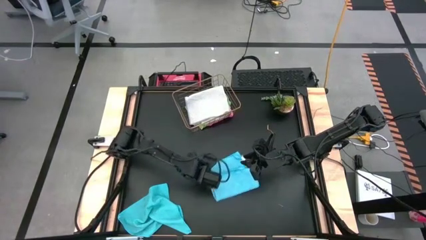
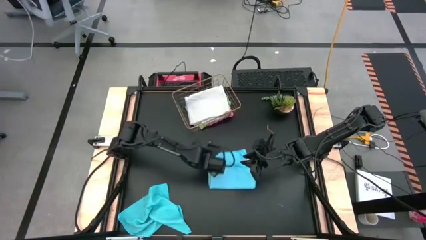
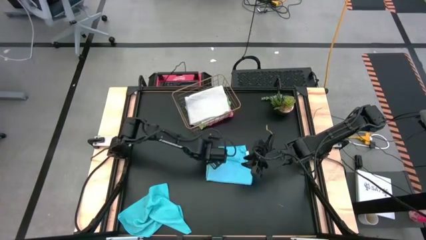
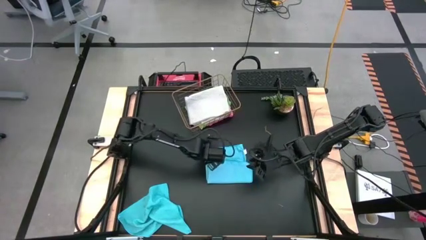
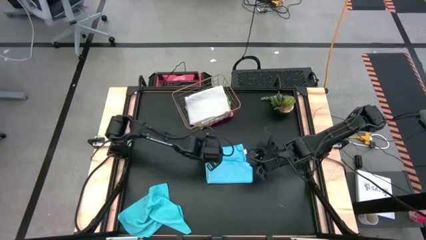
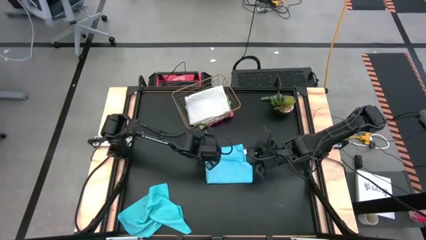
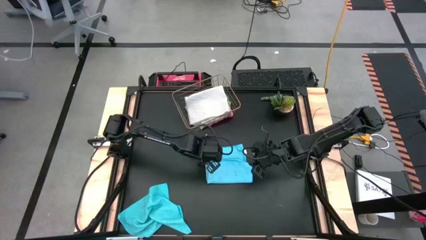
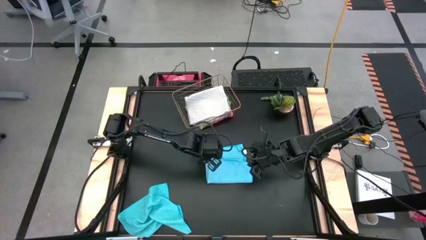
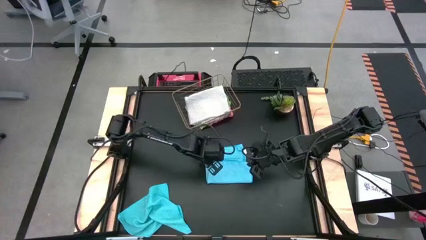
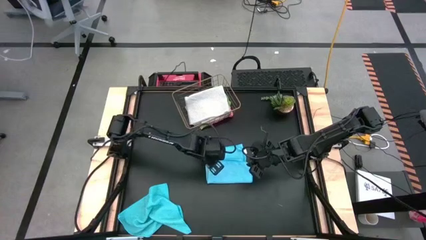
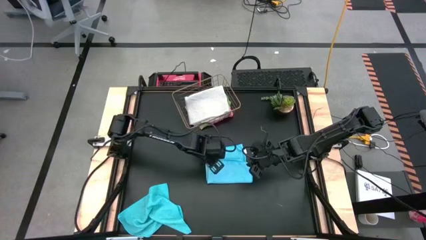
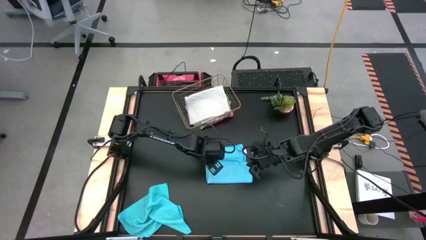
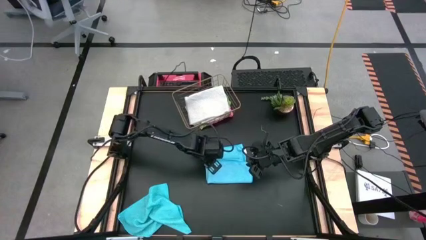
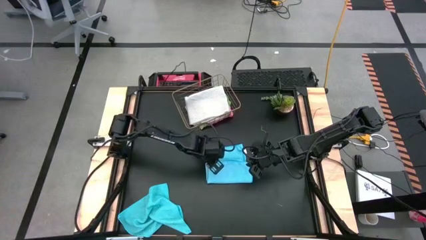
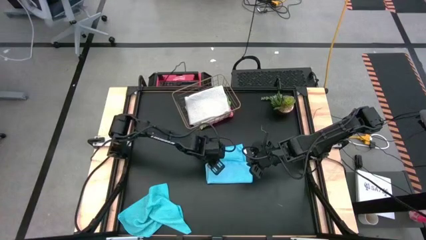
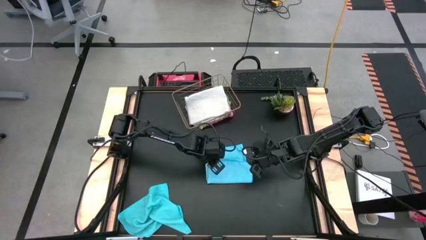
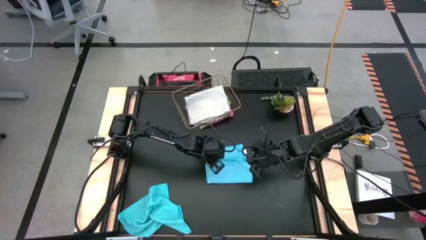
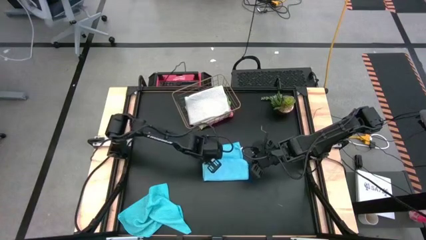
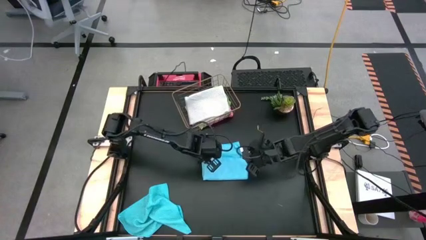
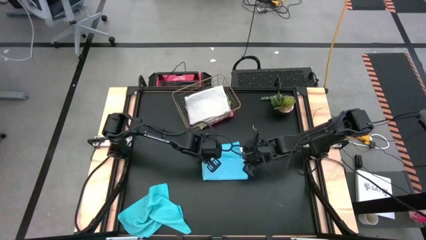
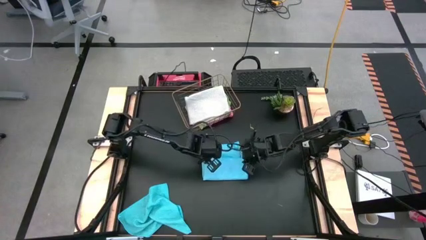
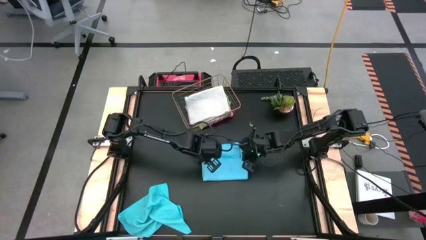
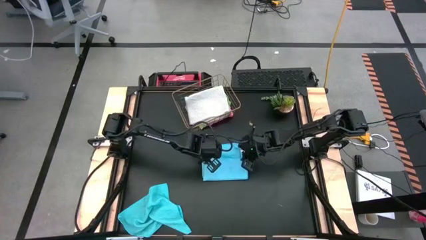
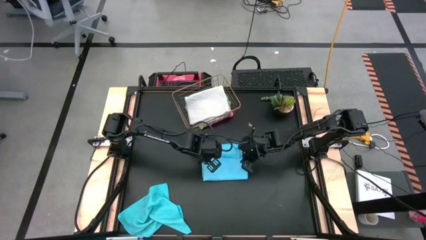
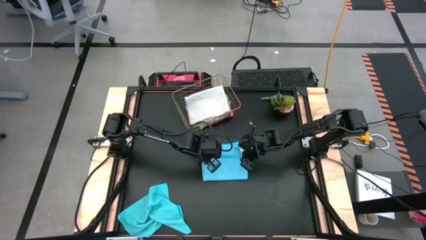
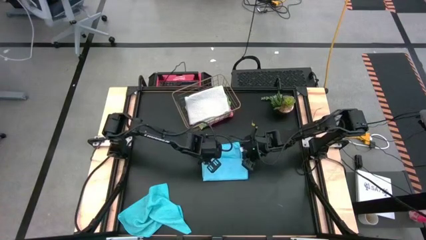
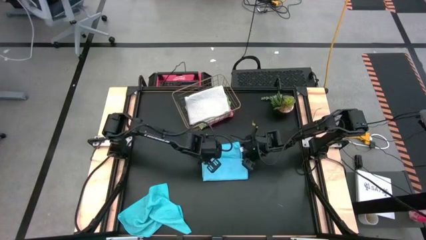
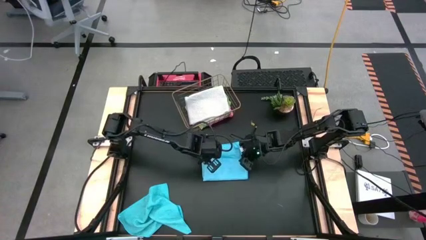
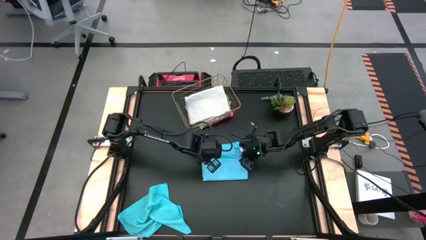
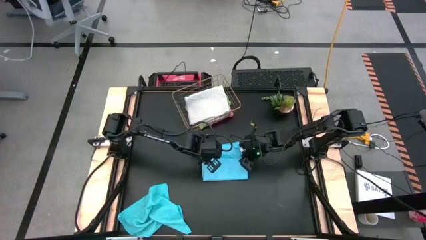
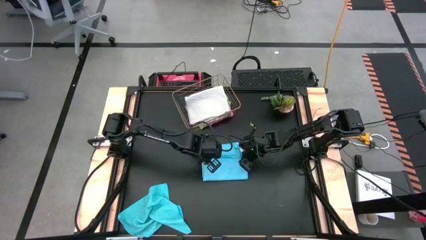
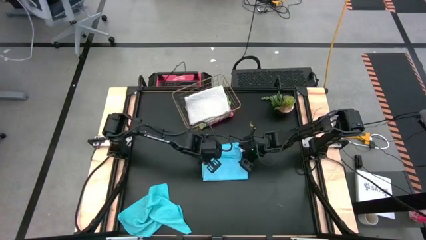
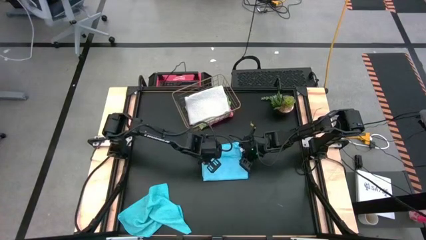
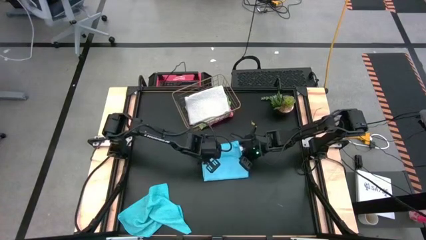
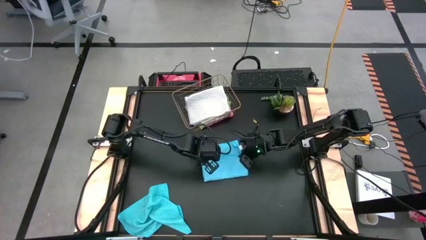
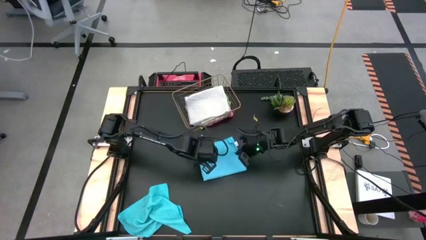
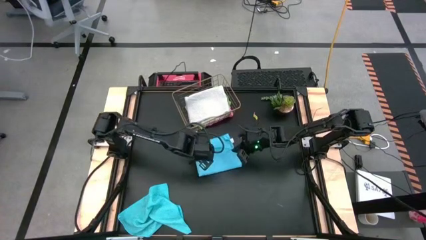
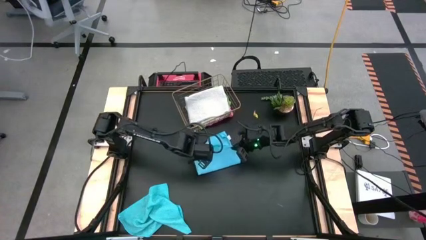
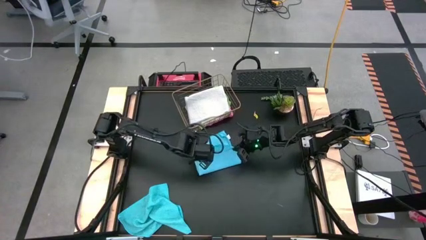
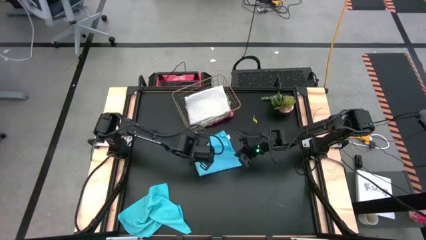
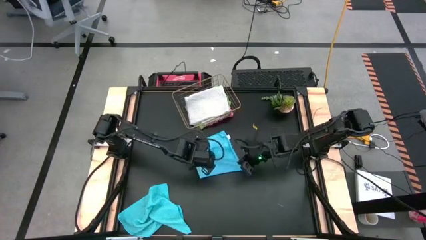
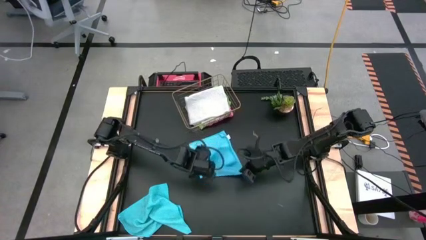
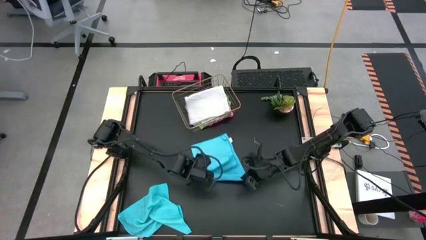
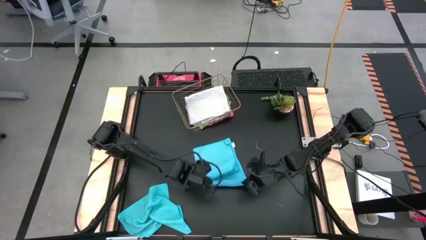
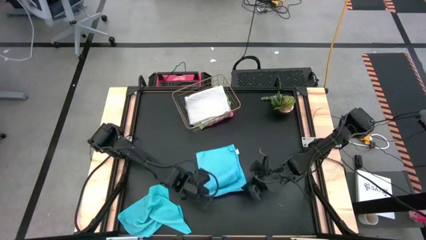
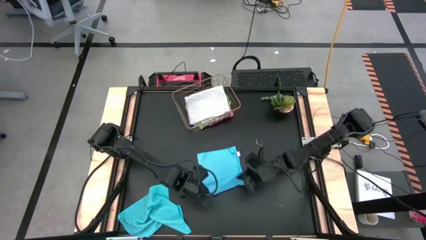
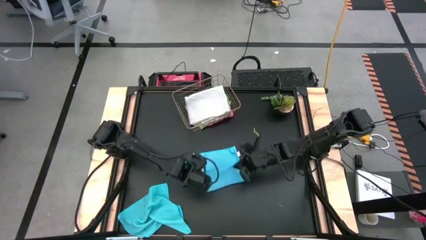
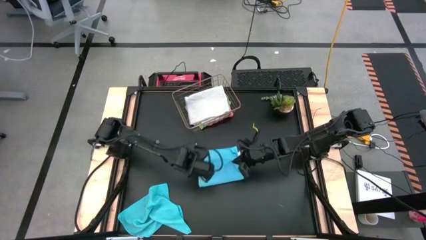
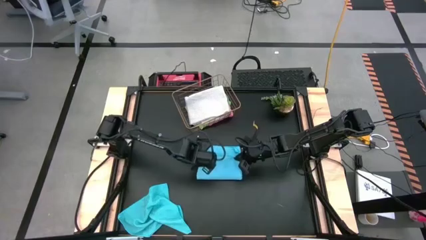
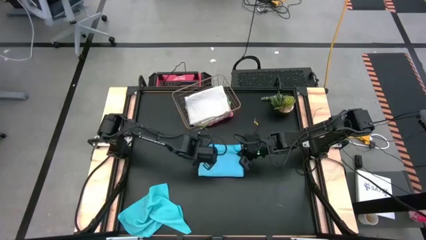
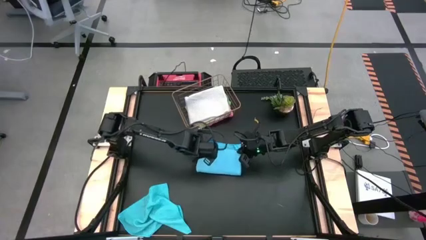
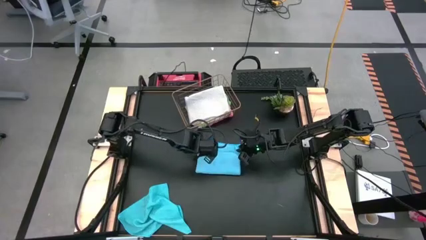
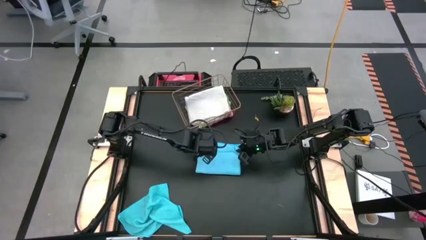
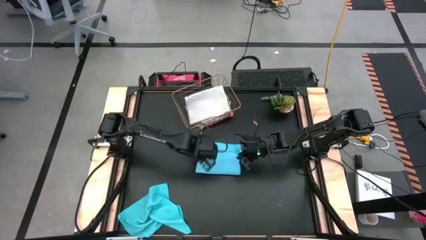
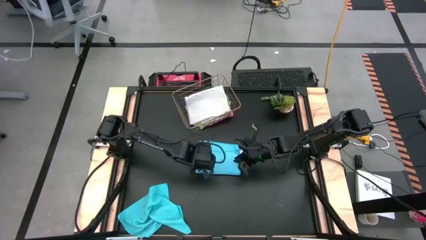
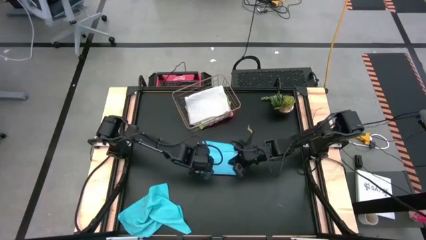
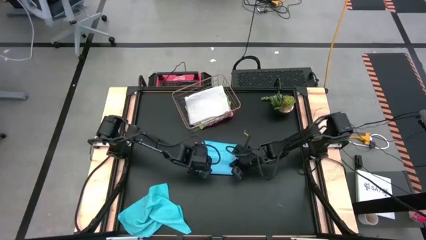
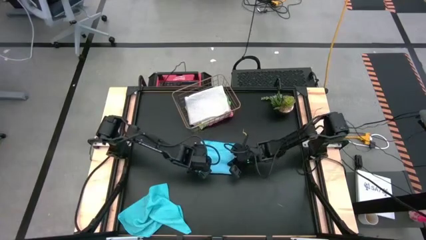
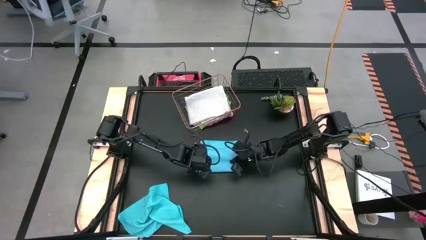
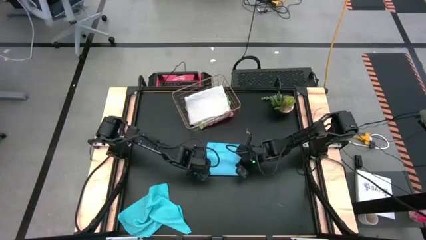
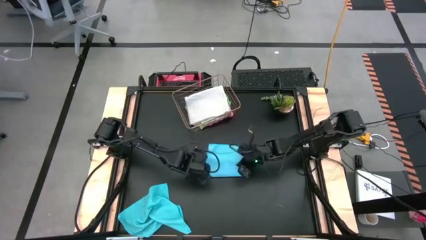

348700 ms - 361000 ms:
Task: Fold microfiber towels
Fold the right light blue microfiber cloth
